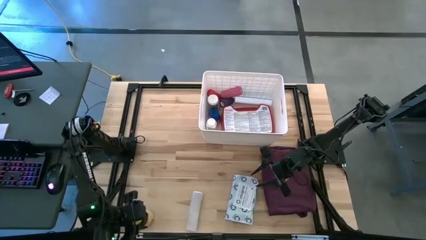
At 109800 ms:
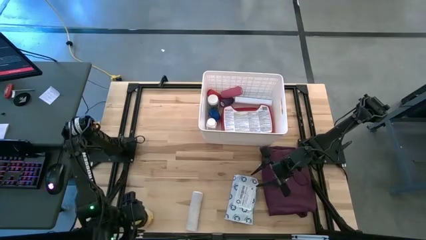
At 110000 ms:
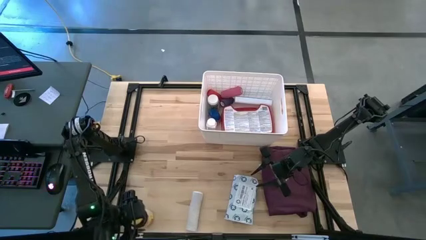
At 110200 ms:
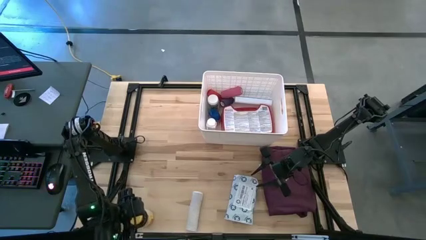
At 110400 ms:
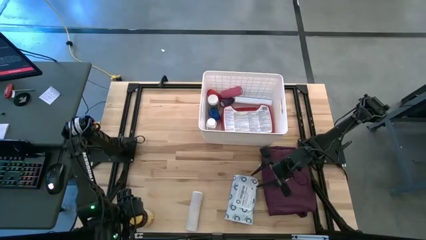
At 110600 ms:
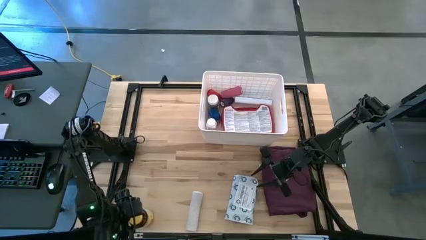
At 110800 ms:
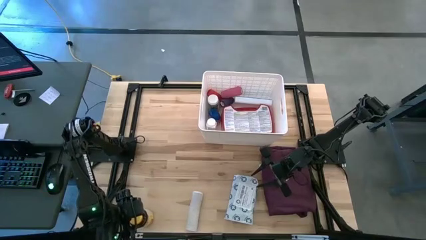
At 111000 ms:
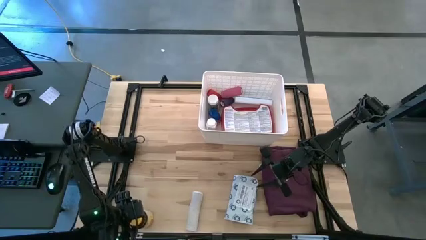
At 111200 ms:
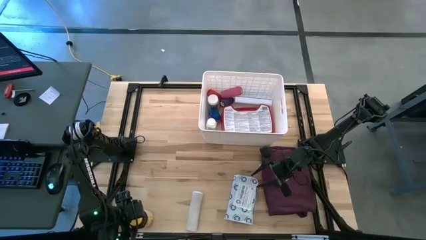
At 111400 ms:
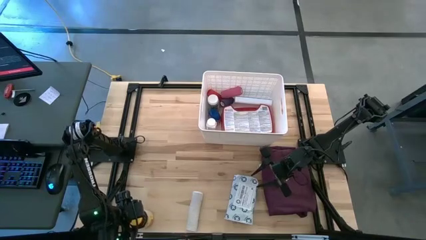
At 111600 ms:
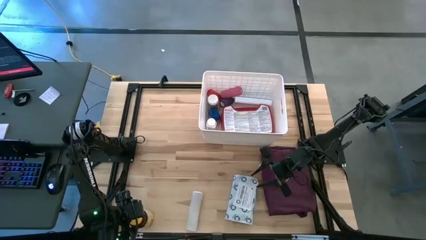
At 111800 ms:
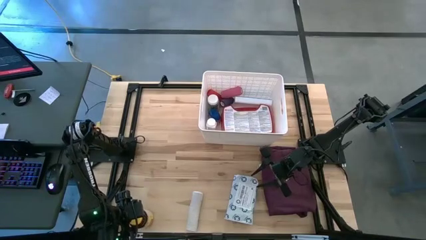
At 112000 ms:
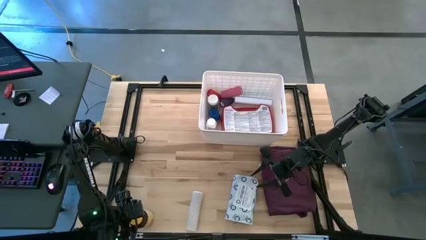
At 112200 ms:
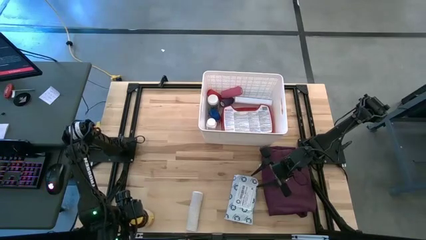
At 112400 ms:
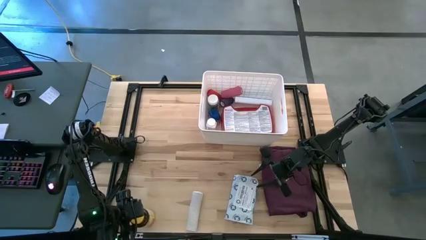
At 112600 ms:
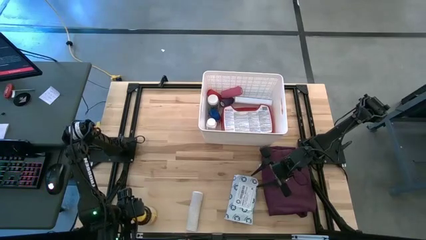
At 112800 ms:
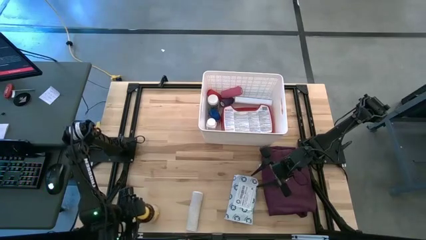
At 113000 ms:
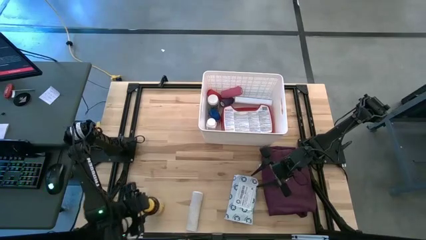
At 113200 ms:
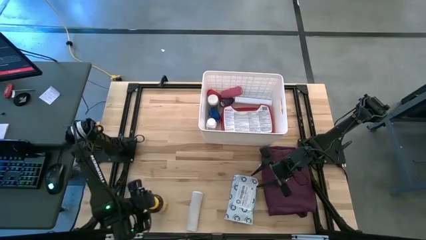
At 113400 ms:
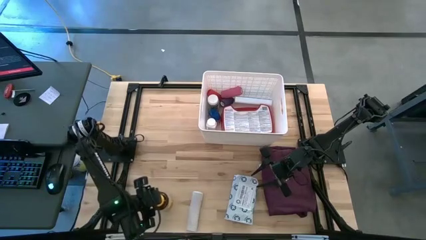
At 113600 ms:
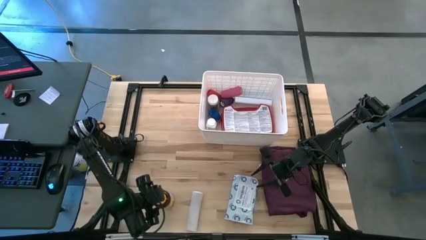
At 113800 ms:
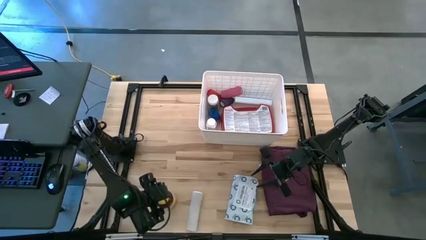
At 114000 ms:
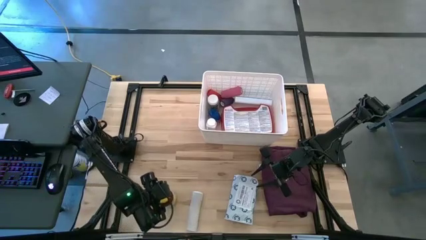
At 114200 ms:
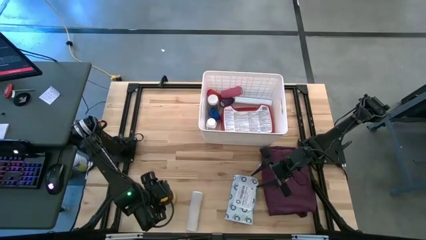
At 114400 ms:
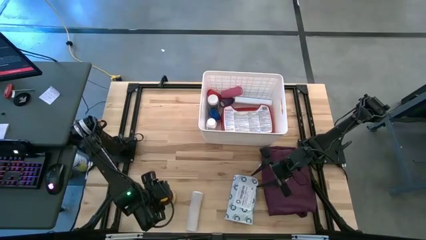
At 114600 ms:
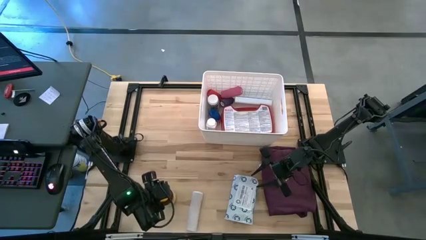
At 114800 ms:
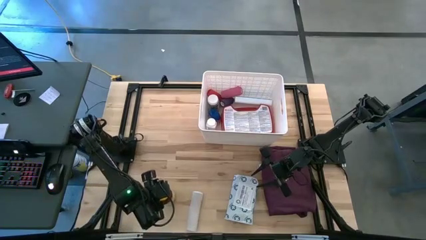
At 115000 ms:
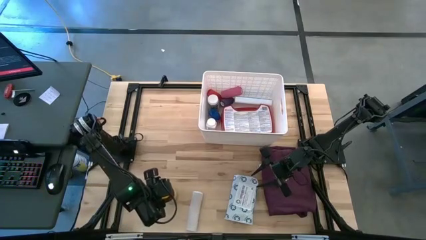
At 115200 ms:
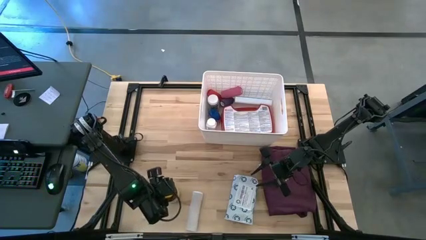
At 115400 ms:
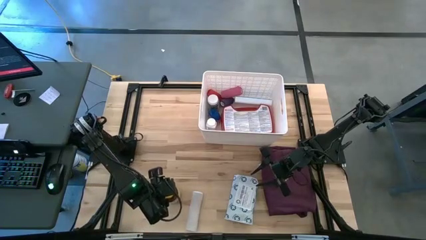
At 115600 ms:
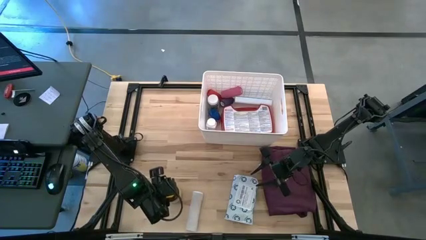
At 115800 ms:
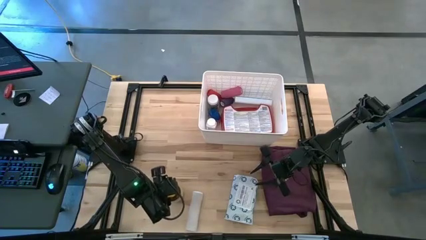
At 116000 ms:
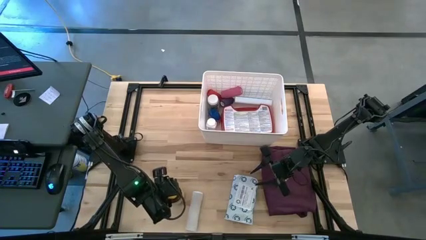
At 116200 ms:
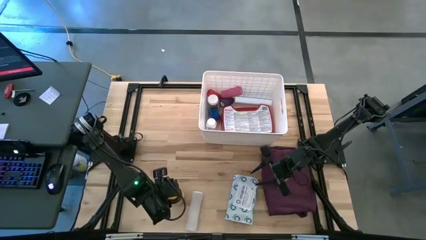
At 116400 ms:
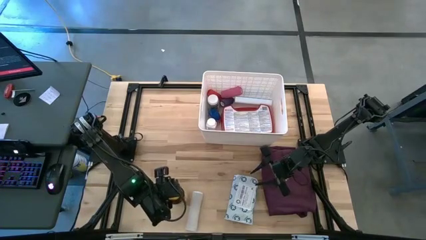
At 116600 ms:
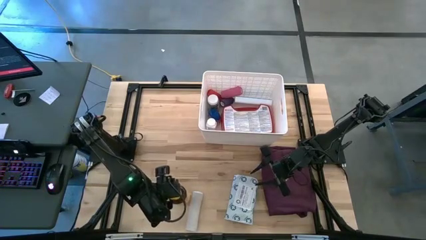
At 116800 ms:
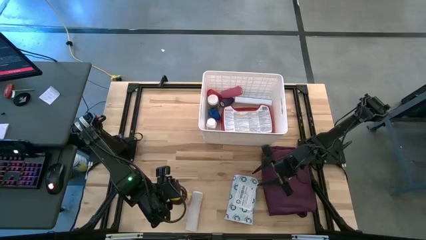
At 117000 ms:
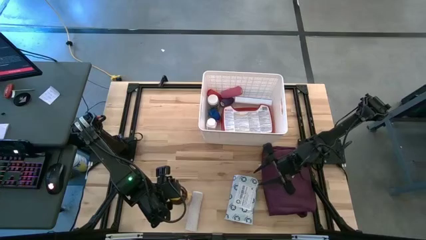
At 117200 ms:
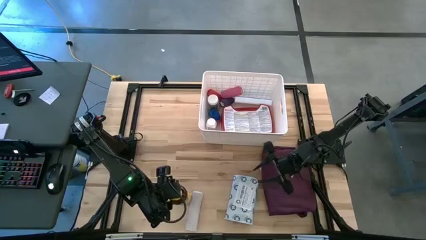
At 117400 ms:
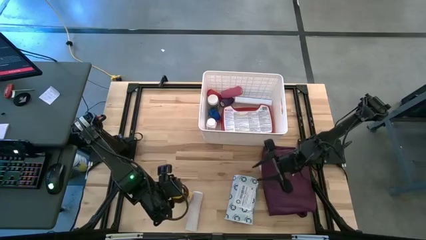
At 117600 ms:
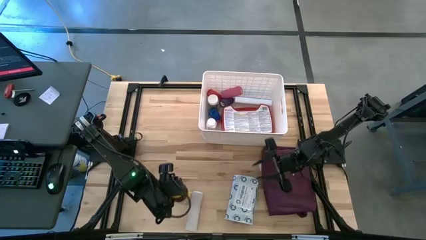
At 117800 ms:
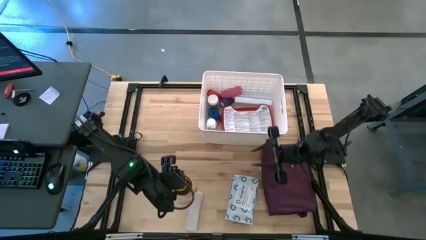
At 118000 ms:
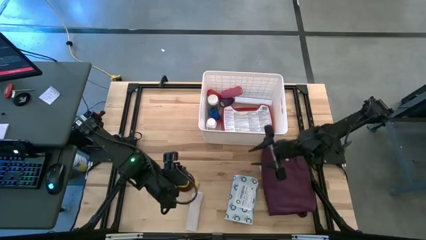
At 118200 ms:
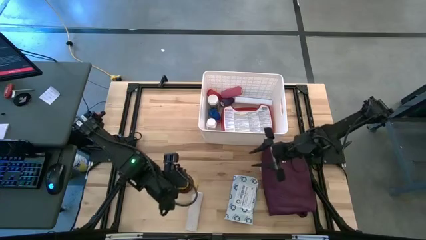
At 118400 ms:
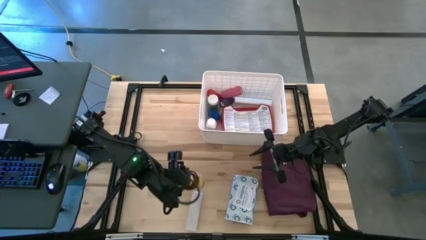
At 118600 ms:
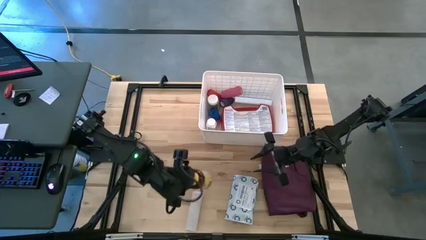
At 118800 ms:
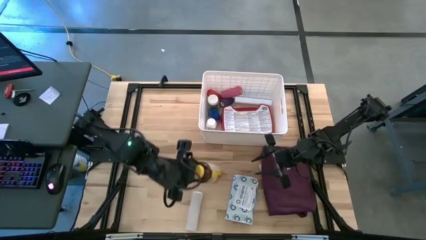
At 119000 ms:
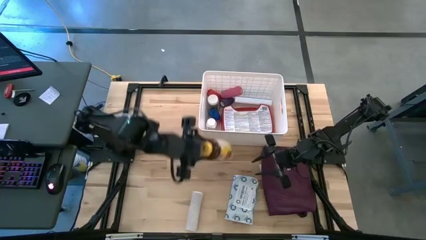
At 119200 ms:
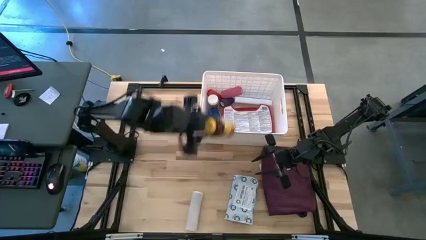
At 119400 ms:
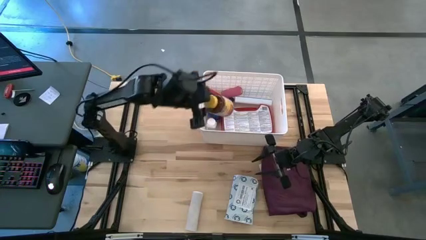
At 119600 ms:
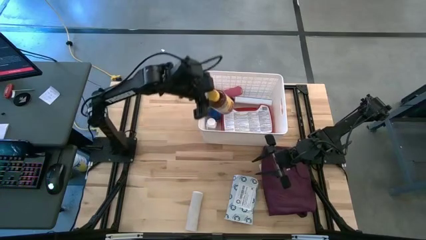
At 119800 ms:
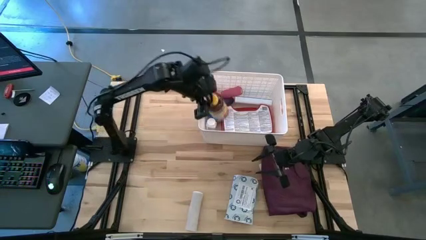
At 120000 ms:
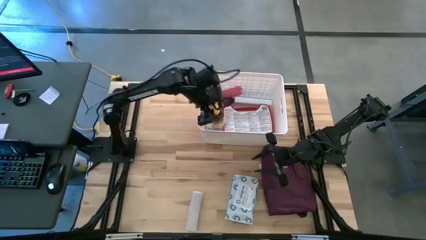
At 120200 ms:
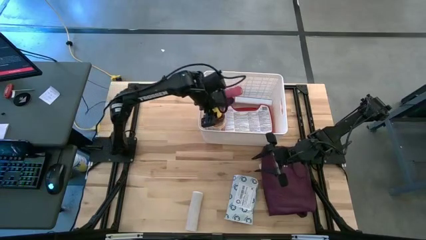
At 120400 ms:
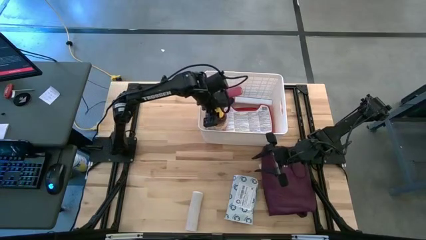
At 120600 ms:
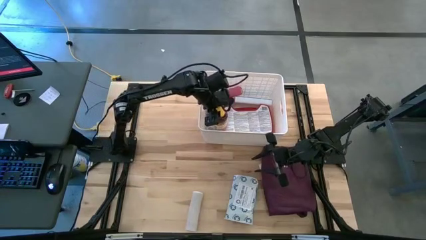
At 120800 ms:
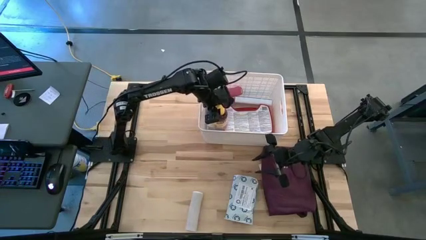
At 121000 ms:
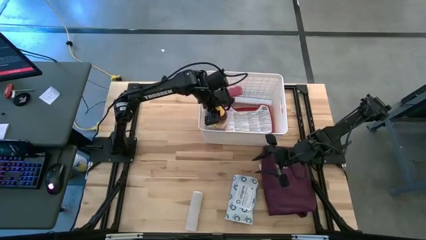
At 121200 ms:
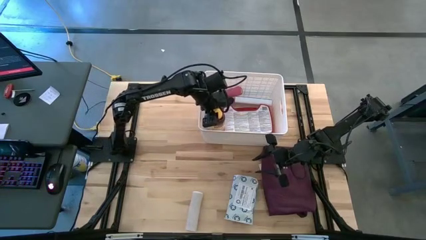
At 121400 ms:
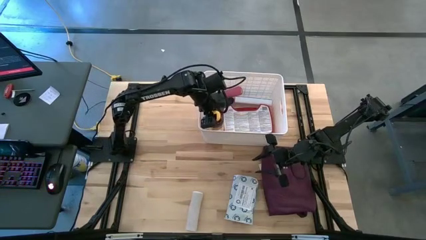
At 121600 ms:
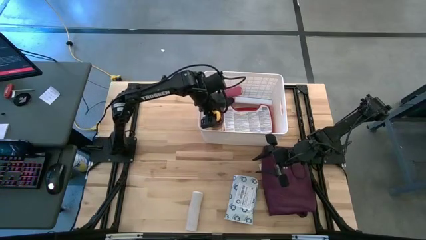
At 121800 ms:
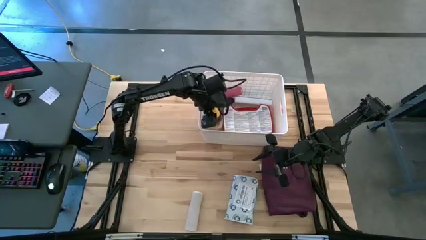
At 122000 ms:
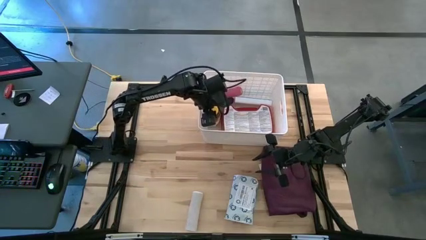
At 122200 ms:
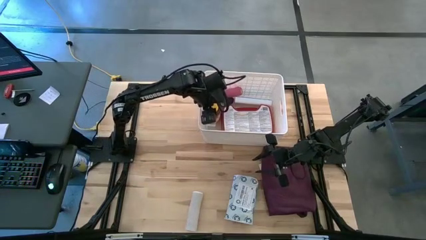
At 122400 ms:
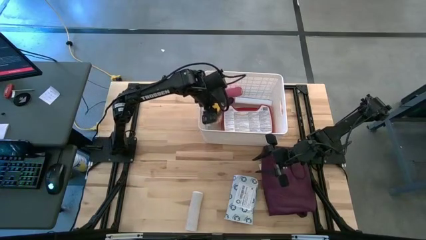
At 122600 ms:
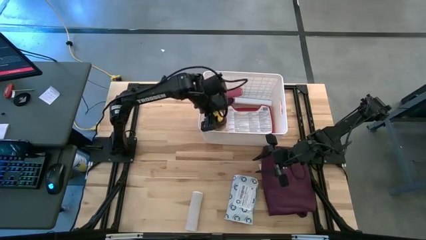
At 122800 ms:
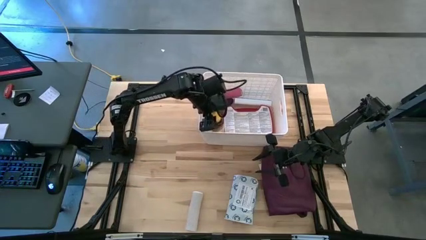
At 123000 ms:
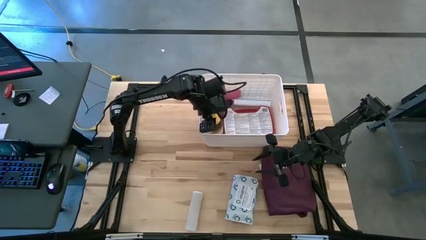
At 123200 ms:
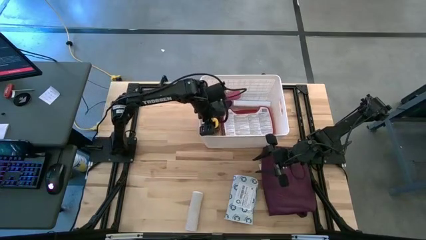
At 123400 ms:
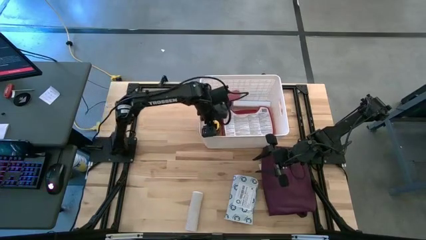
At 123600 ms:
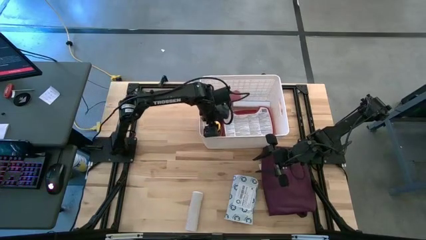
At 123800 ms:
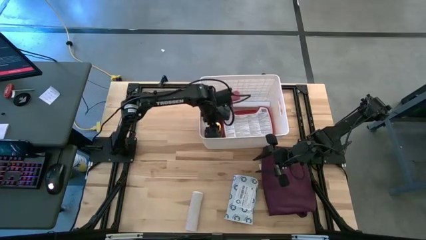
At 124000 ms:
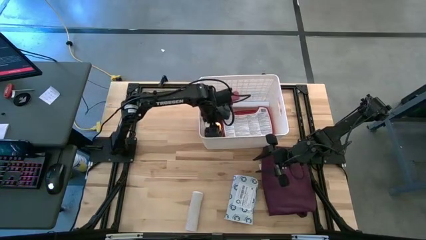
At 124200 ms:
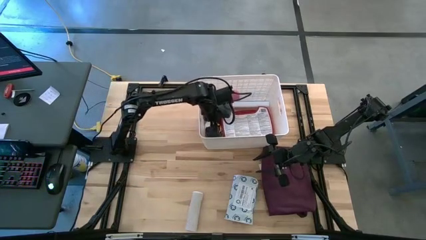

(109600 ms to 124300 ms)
Task: Pick & place medical supplies in basket/bin
Put the yellow medicine bottle into the white container

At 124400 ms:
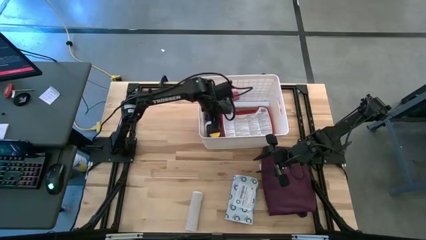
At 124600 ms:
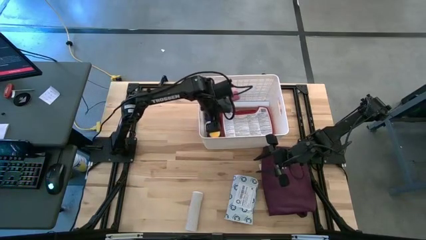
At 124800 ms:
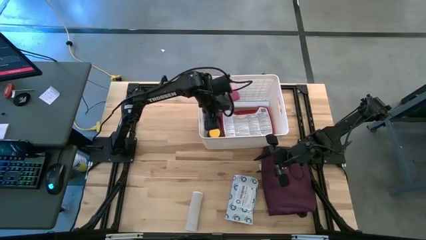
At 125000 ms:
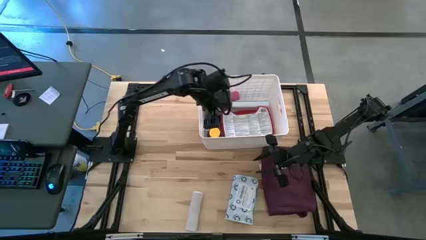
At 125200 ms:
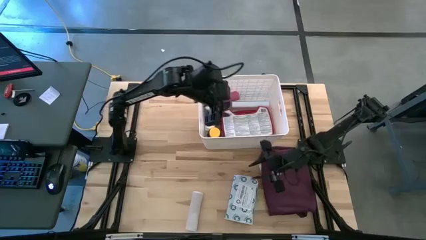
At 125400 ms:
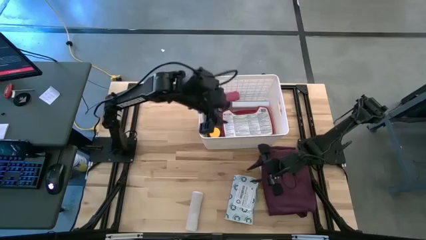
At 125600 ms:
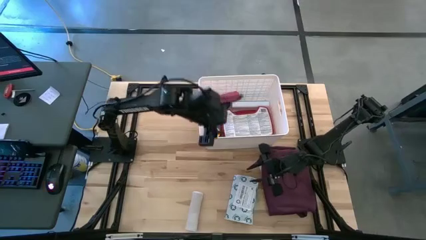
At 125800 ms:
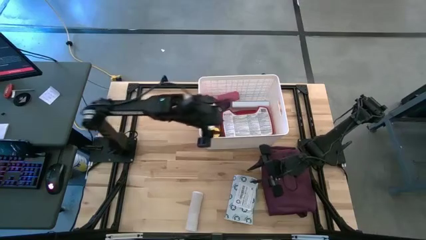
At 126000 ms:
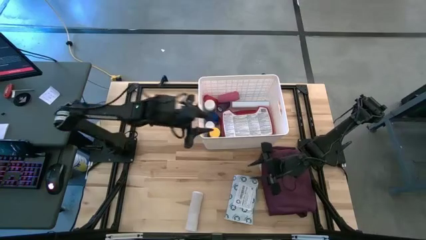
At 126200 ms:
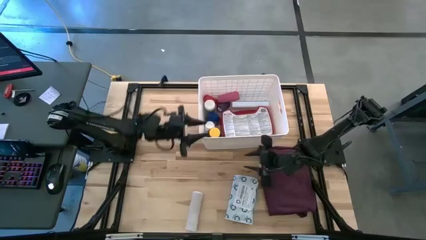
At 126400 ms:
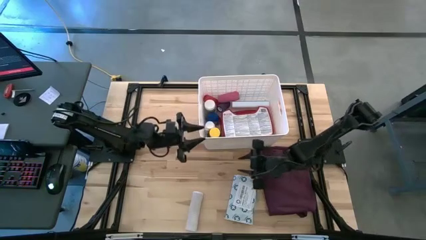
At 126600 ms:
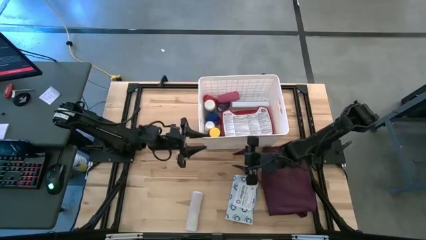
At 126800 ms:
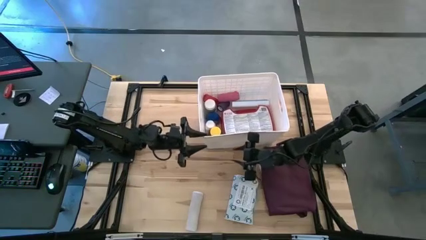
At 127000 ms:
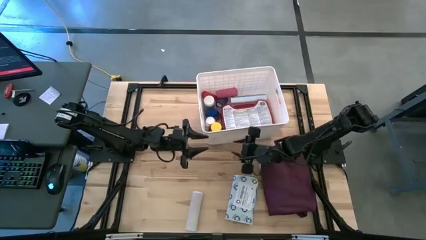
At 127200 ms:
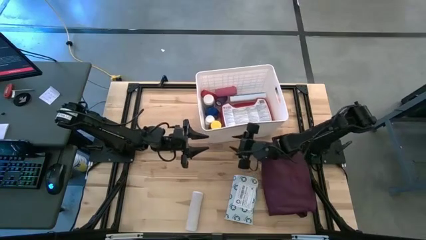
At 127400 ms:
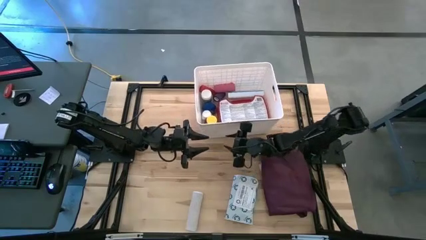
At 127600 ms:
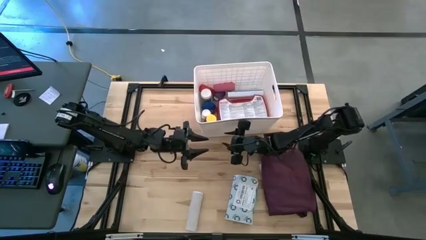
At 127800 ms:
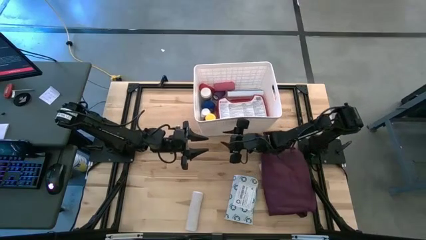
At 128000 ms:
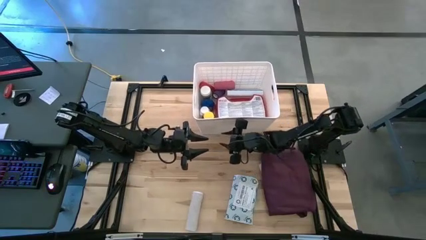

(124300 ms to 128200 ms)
Adjust the white container
